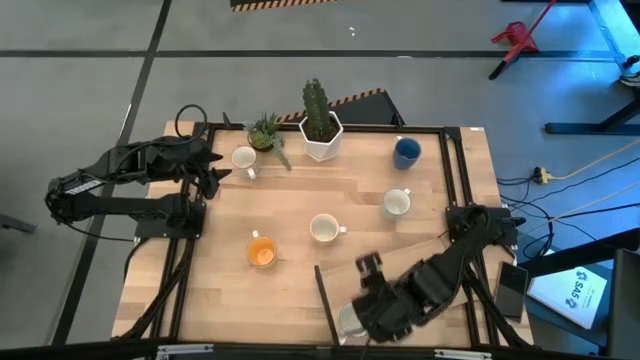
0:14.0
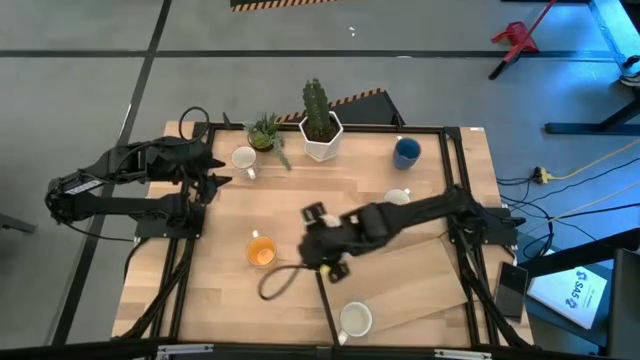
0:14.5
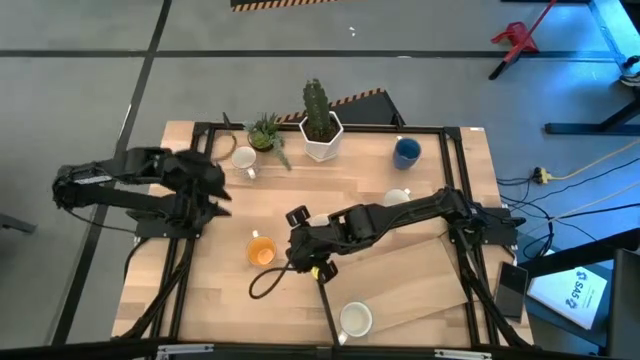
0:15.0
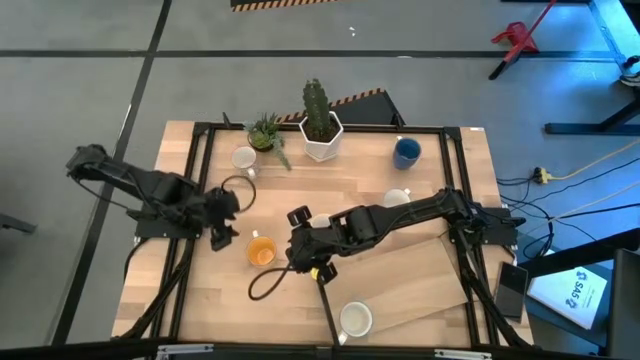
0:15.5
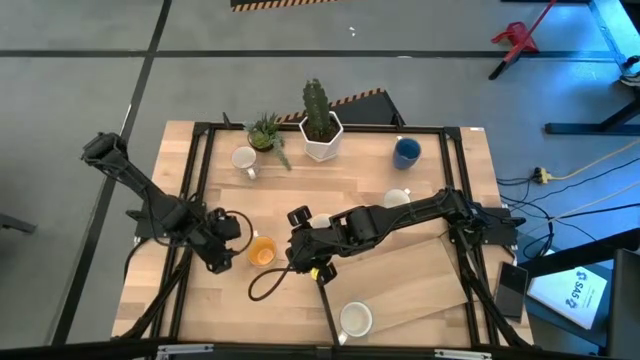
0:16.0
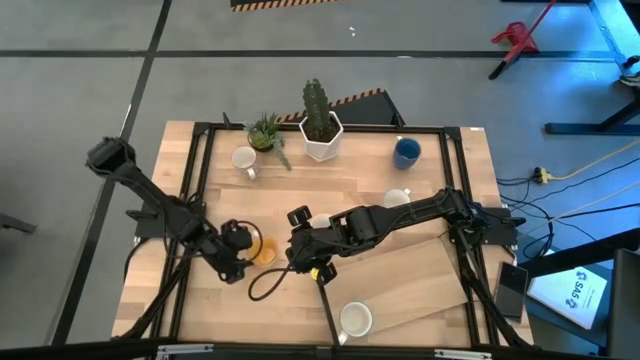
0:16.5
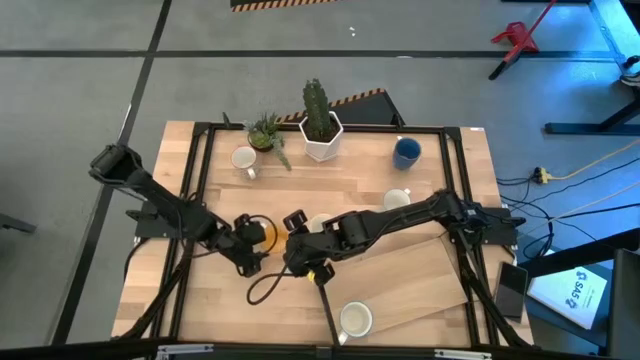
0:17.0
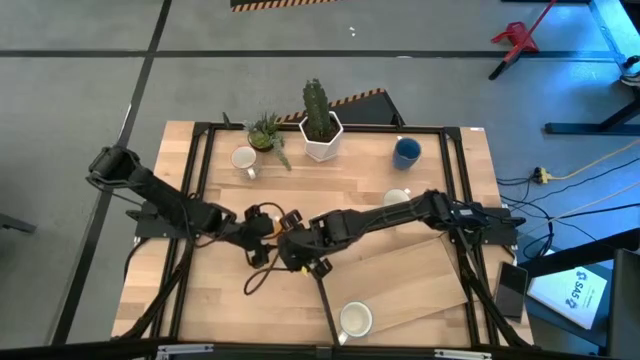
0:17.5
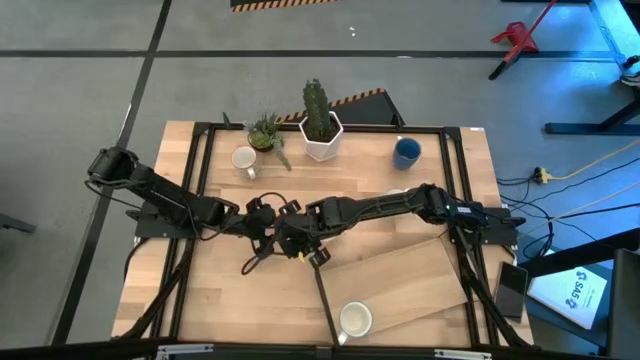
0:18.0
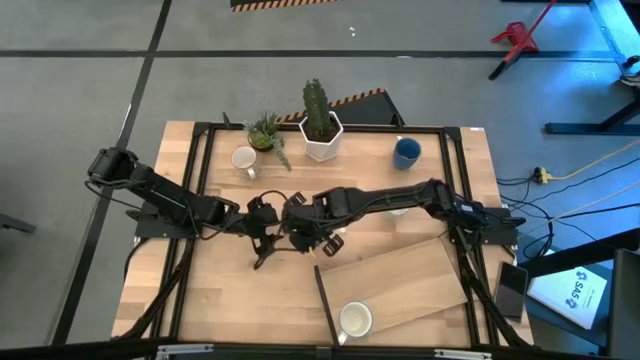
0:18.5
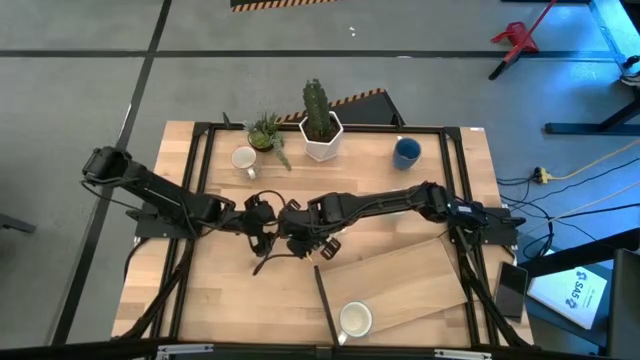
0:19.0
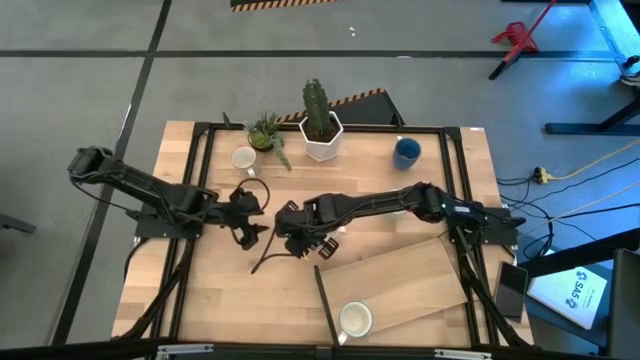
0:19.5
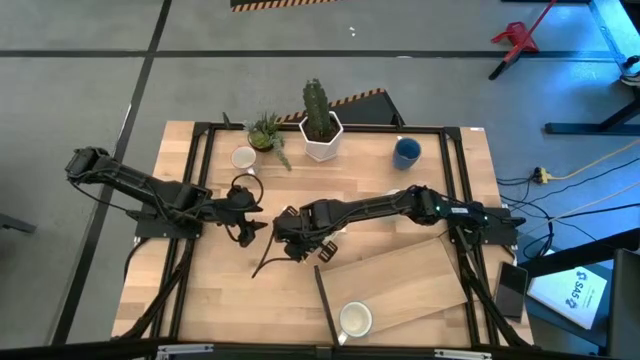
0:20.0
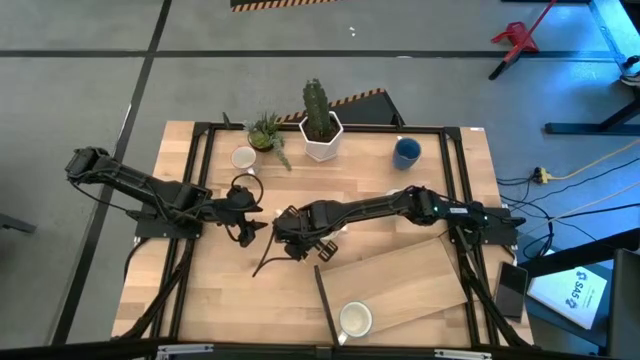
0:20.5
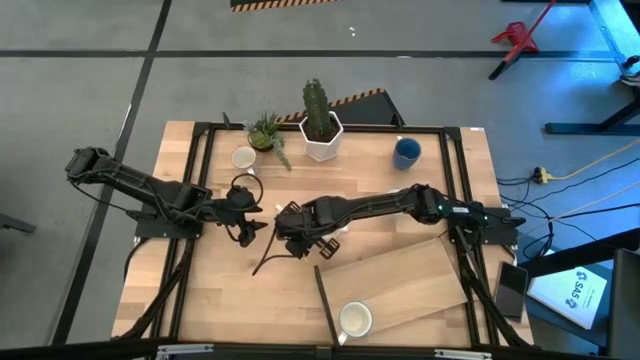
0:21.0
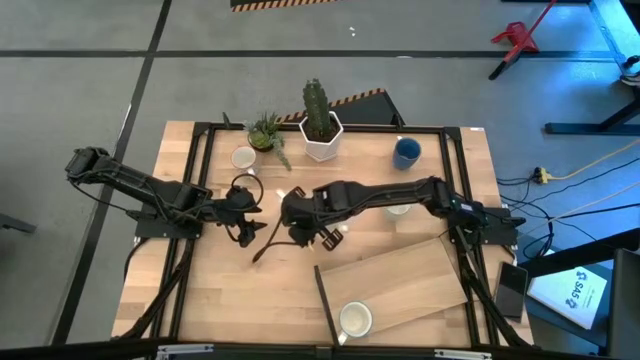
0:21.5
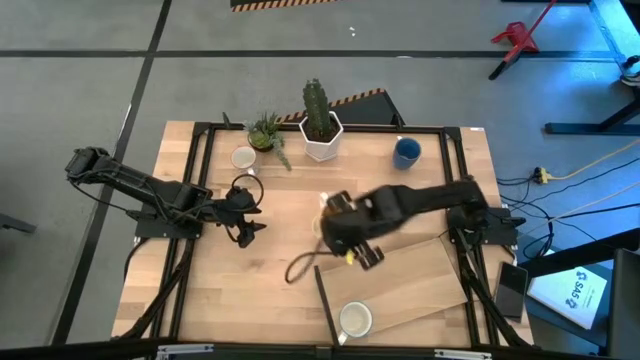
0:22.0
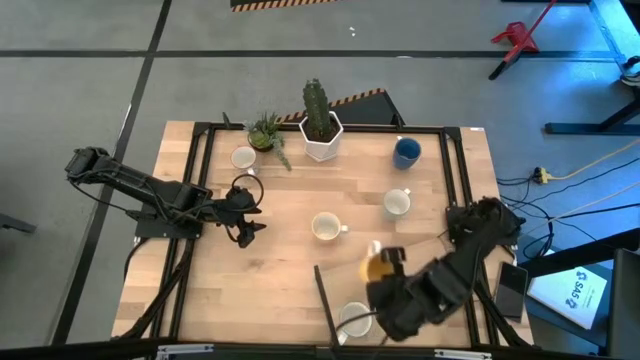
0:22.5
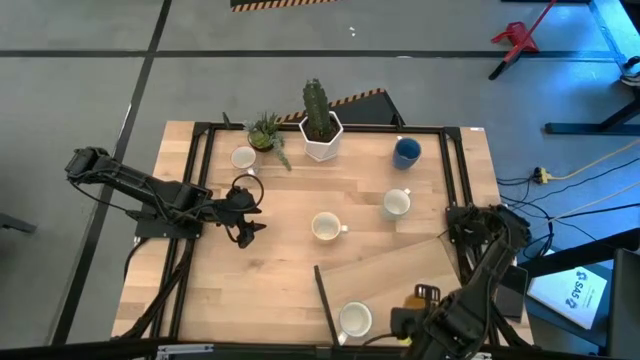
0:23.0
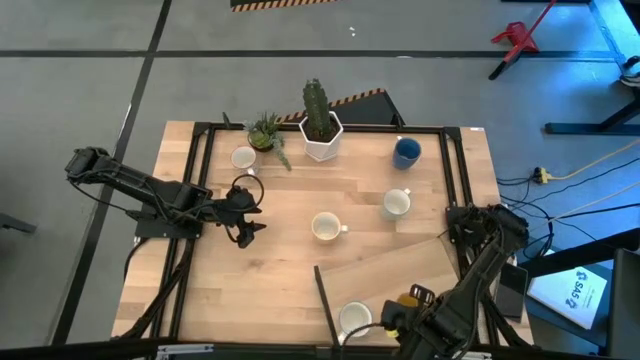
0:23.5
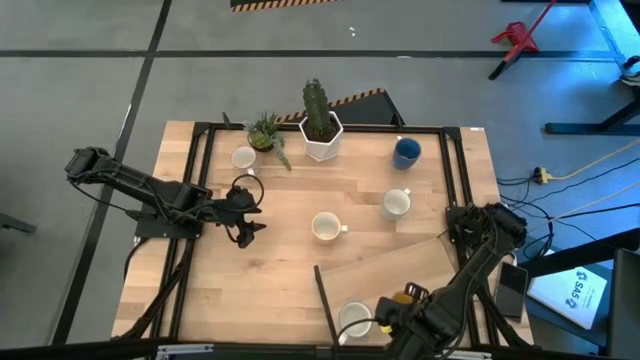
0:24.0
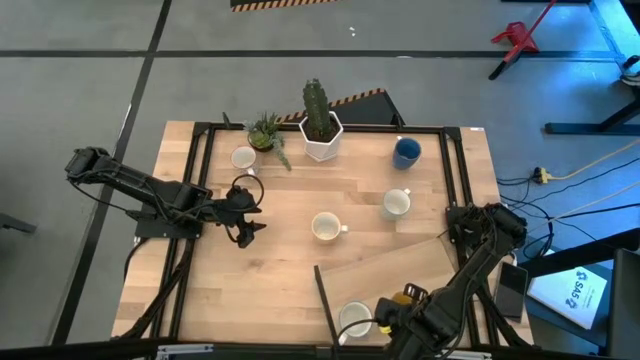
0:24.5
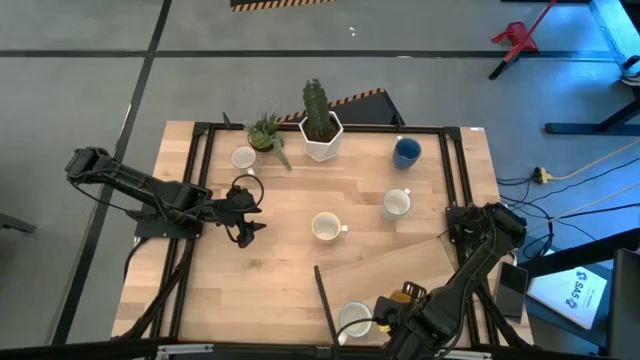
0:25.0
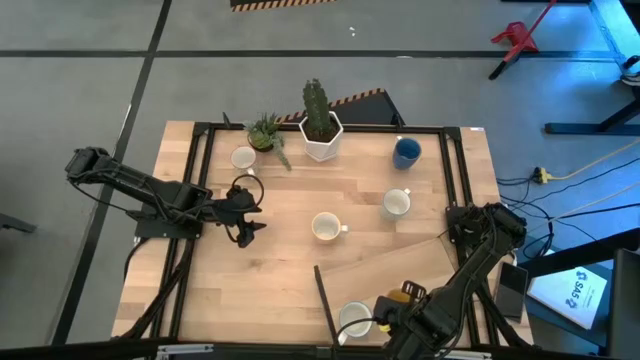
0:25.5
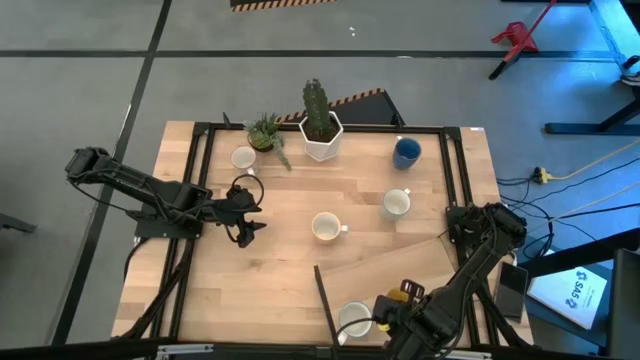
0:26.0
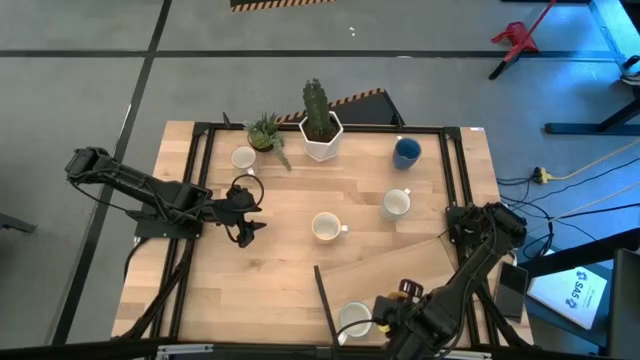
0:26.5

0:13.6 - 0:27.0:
Task: Place coffee mugs
Put the yellow mug on the shelf

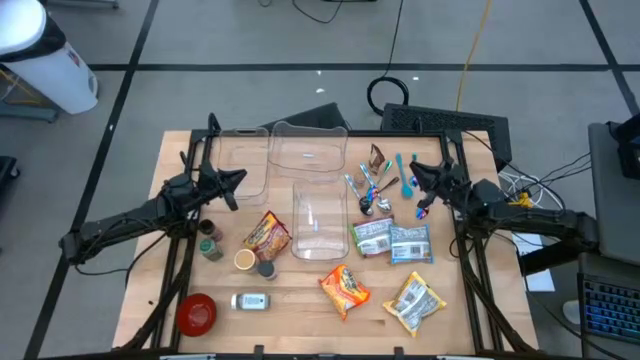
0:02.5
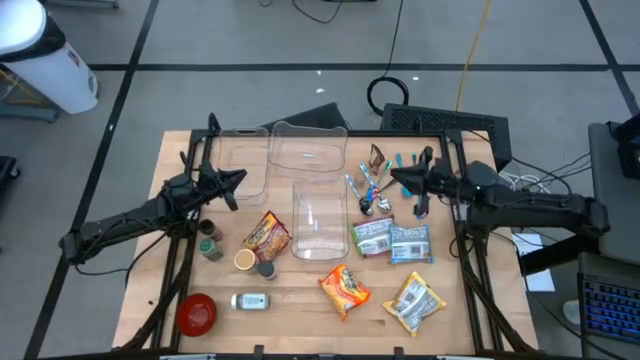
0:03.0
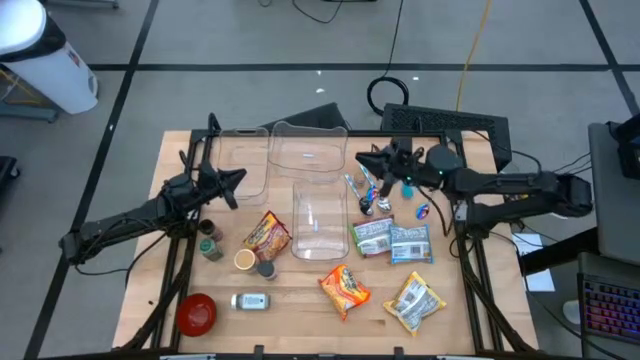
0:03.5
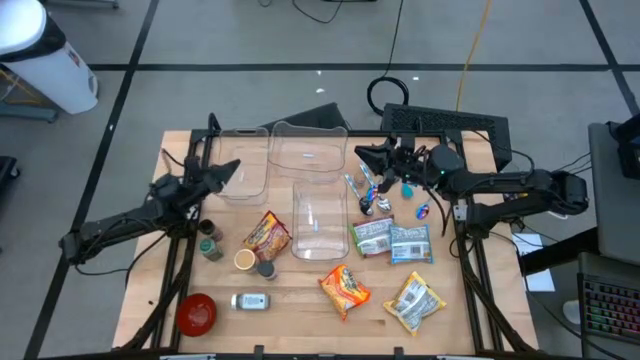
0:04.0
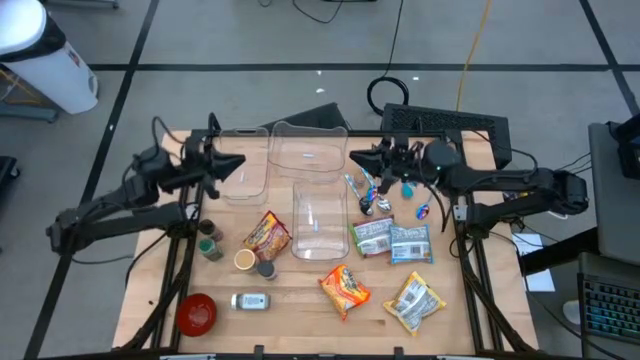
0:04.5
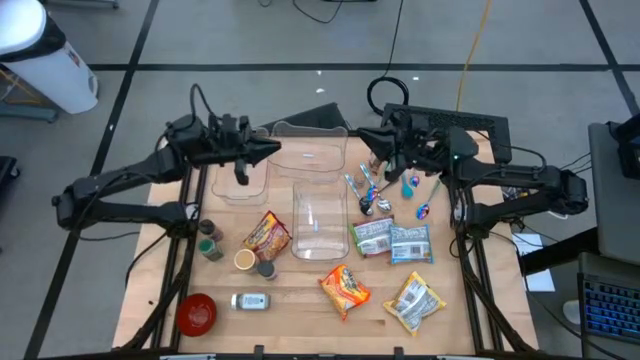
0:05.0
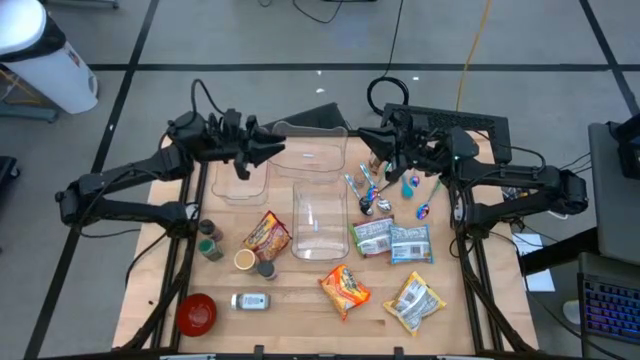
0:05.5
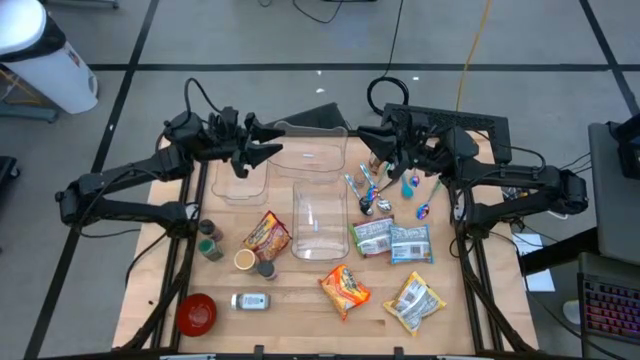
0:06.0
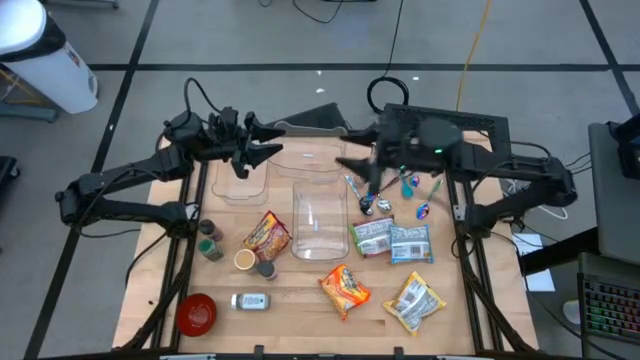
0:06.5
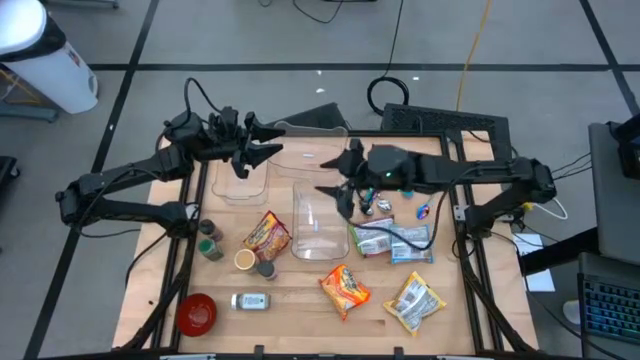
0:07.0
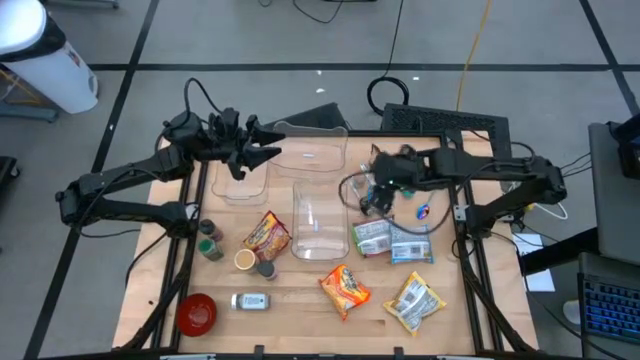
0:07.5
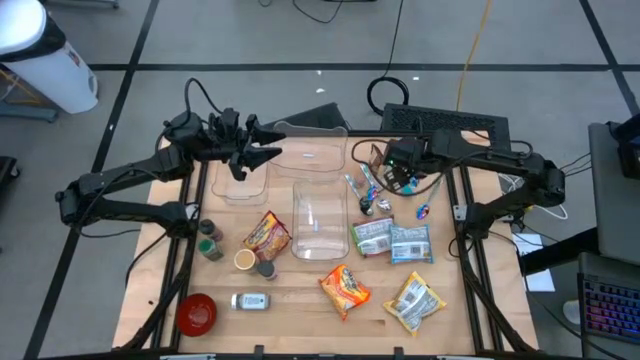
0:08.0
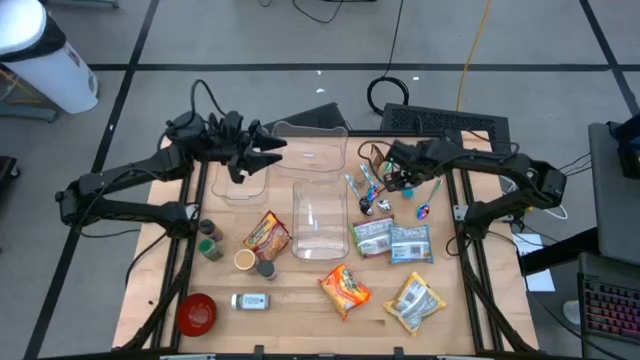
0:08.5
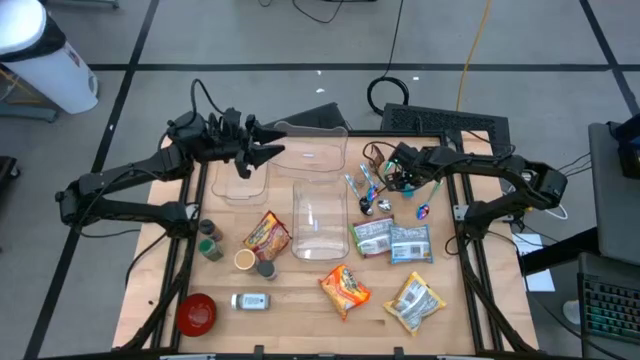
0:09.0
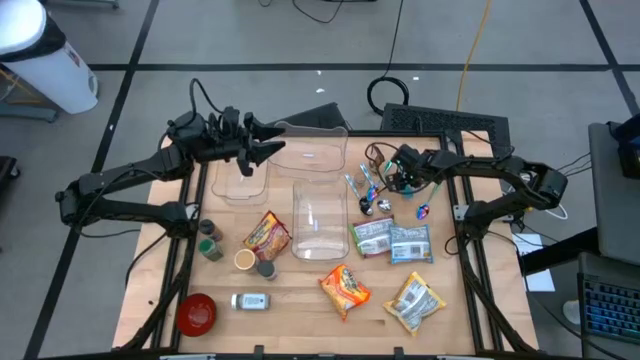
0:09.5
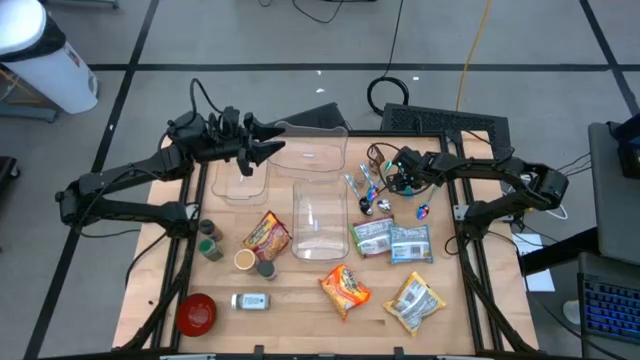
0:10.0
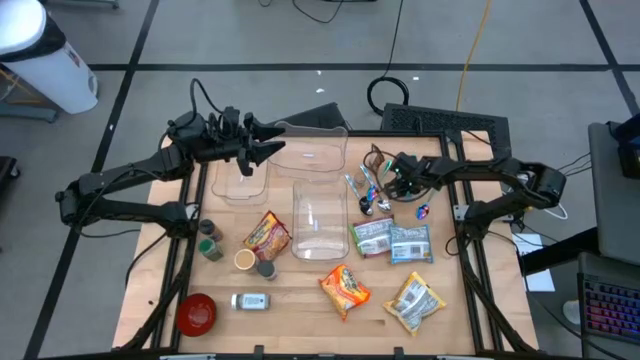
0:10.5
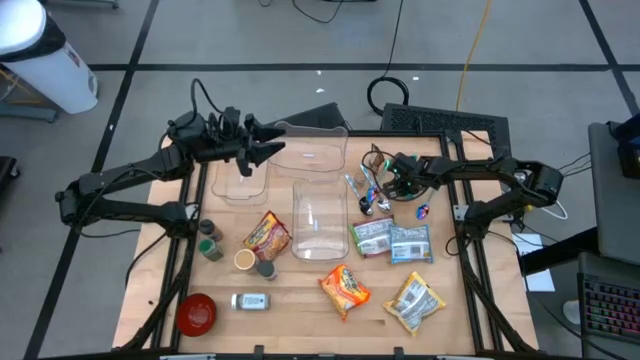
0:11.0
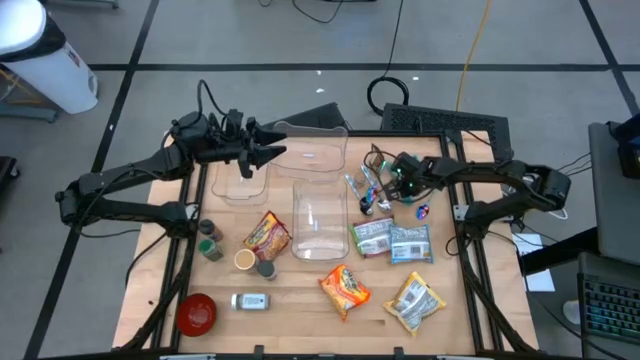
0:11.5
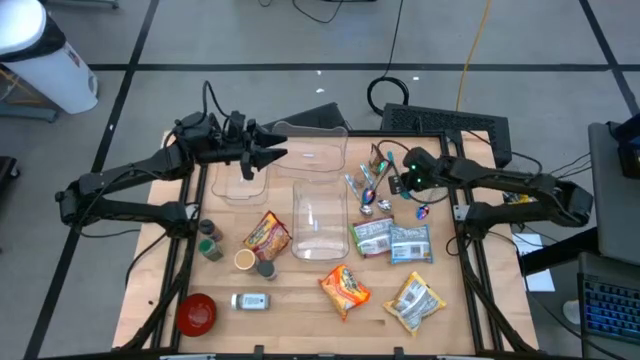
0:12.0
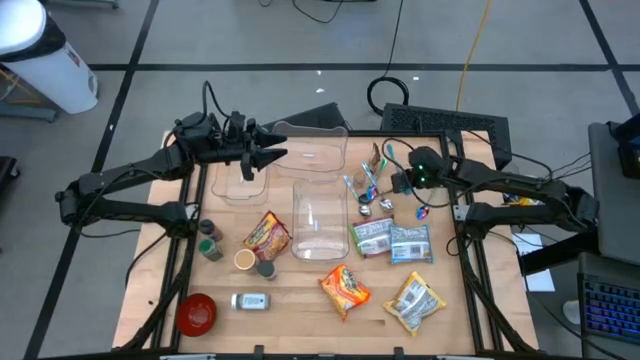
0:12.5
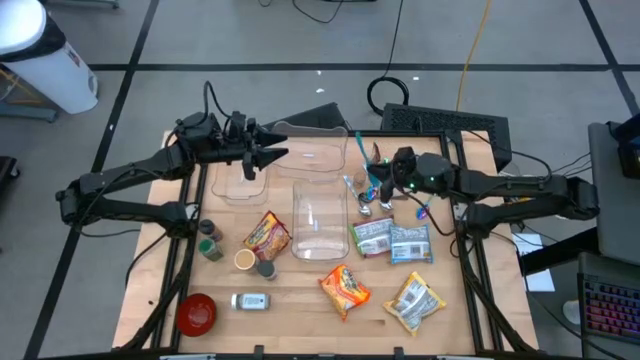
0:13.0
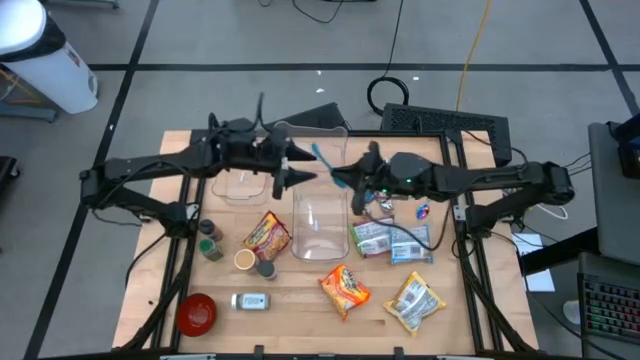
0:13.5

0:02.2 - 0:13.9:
Task: Pick & Place Food Item
Put the blue spoon into the bottom right transparent bin
